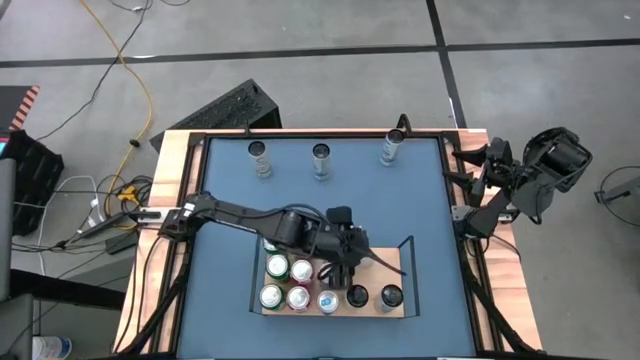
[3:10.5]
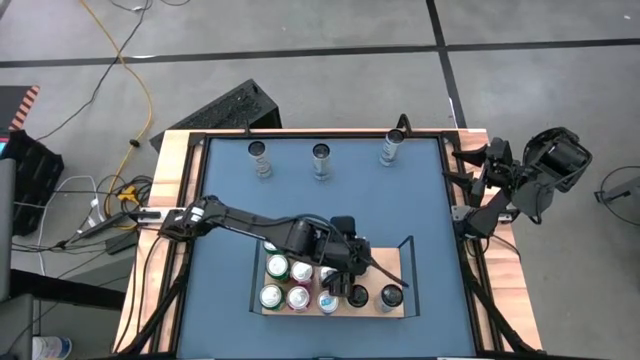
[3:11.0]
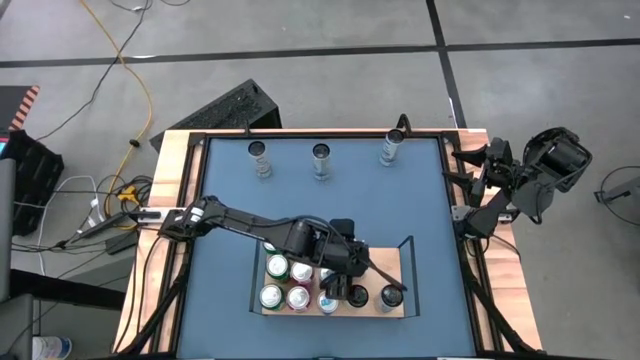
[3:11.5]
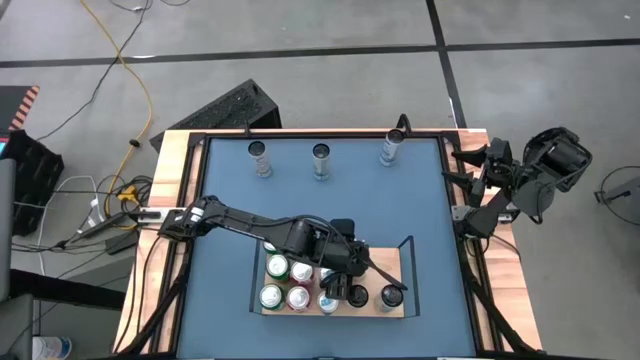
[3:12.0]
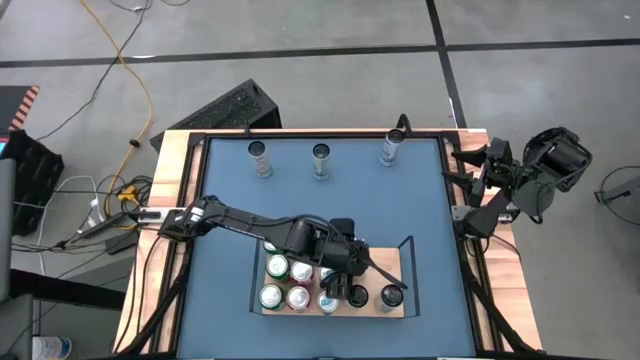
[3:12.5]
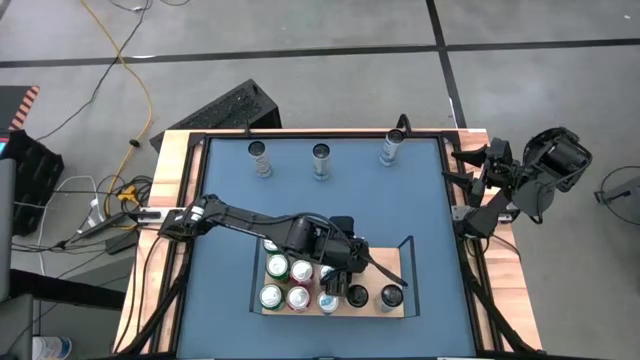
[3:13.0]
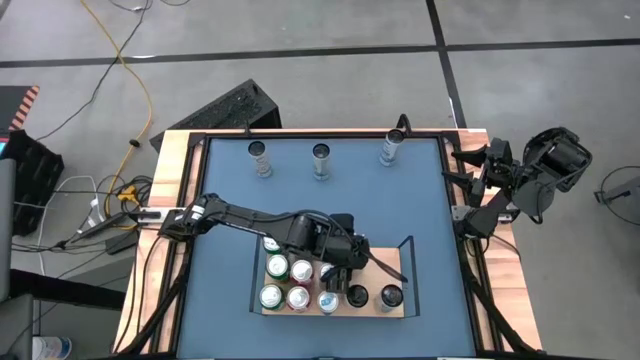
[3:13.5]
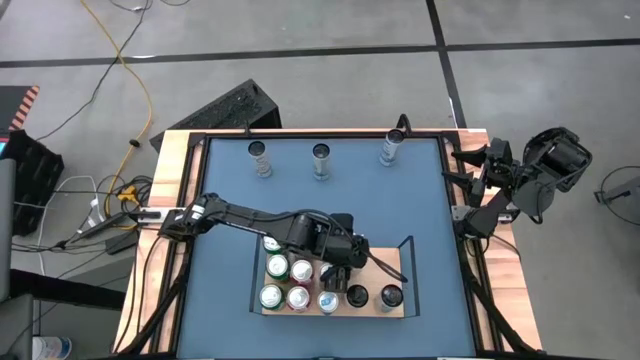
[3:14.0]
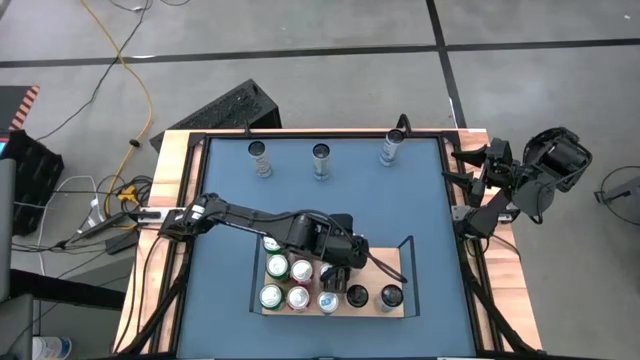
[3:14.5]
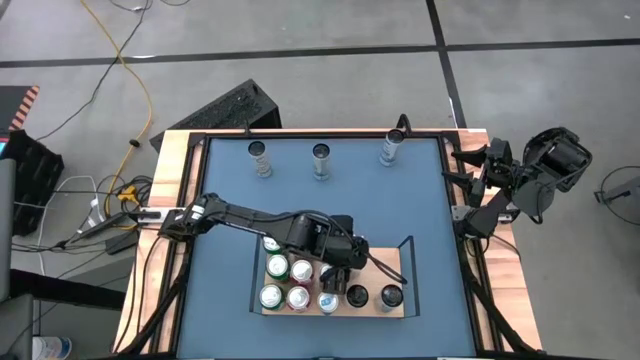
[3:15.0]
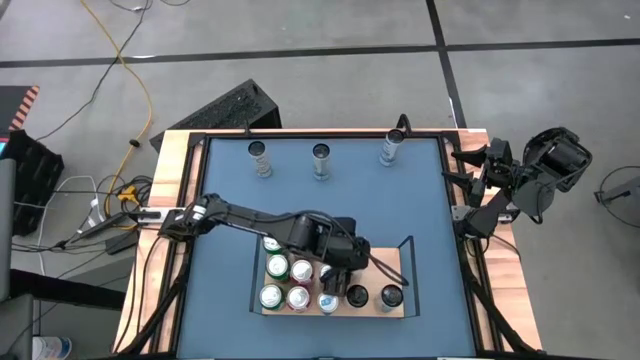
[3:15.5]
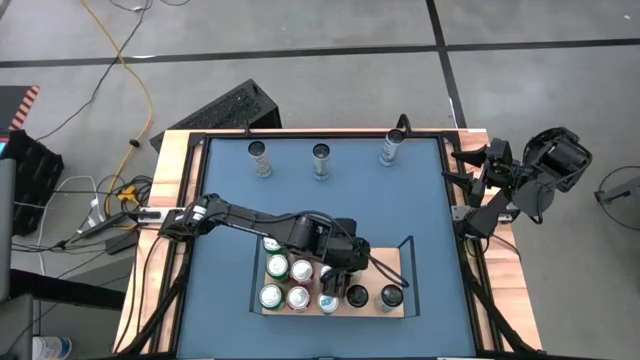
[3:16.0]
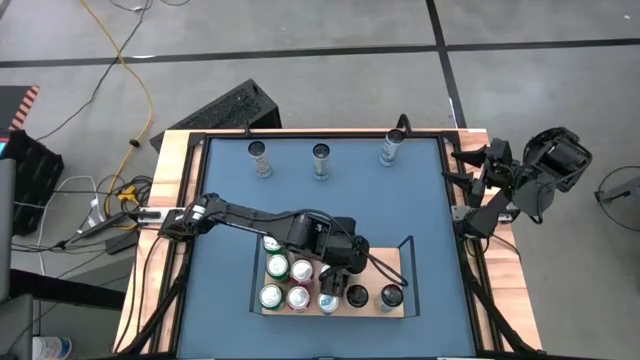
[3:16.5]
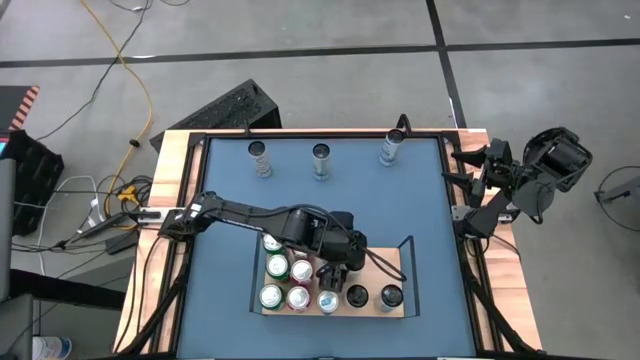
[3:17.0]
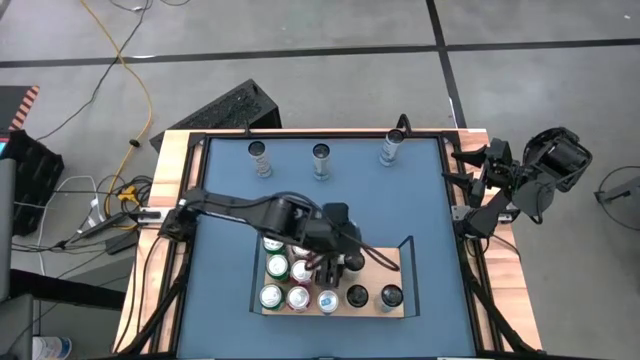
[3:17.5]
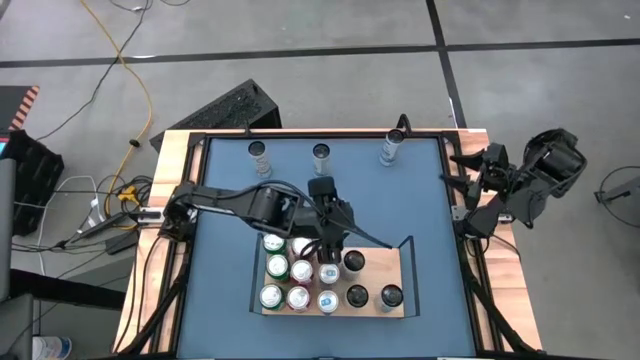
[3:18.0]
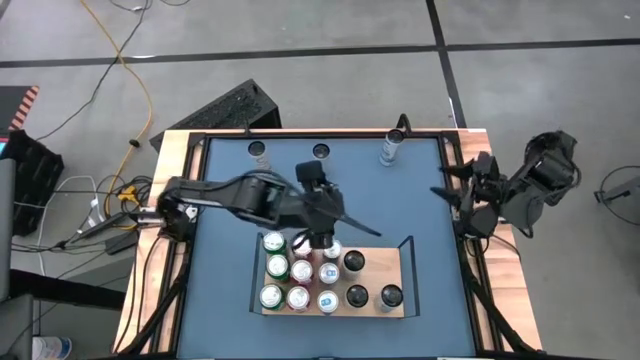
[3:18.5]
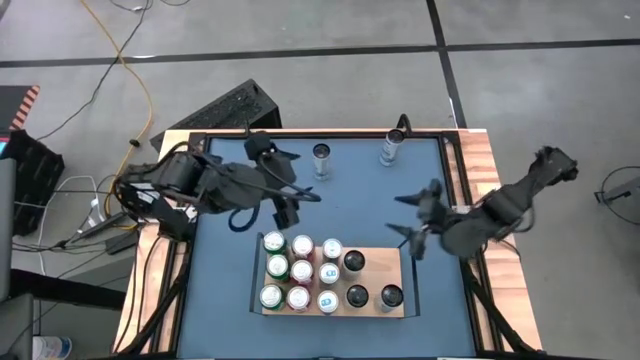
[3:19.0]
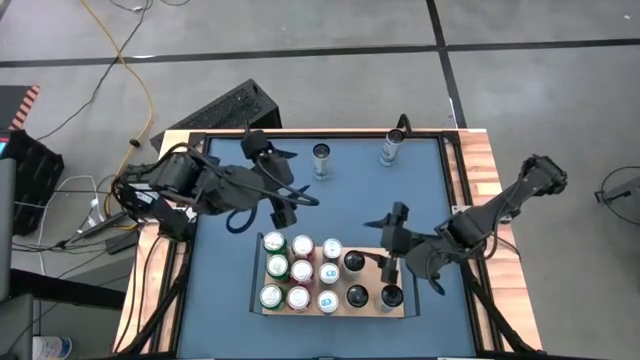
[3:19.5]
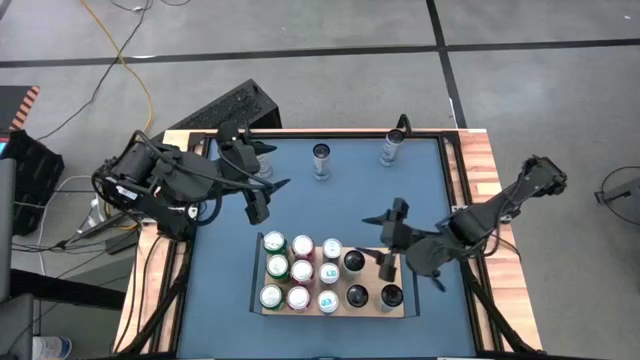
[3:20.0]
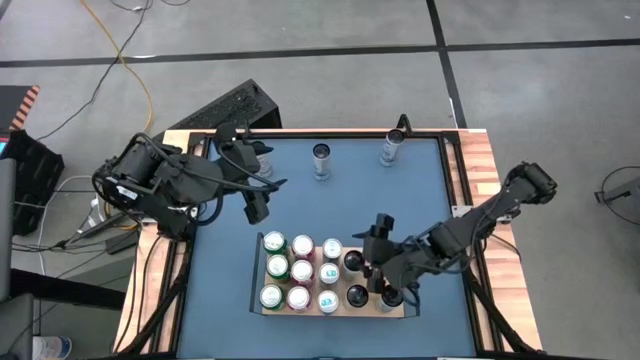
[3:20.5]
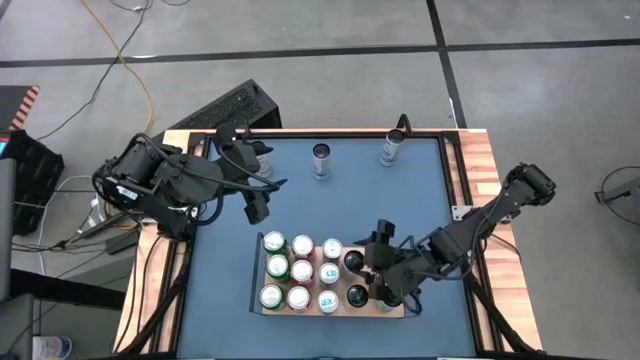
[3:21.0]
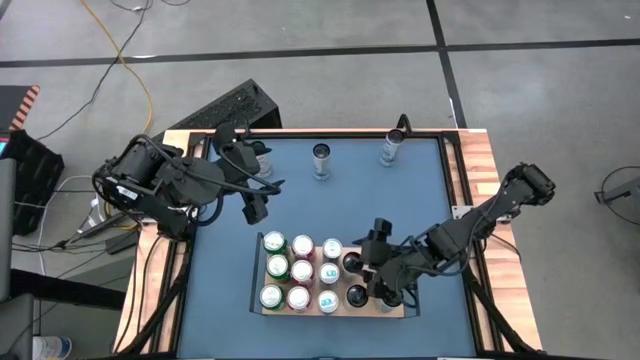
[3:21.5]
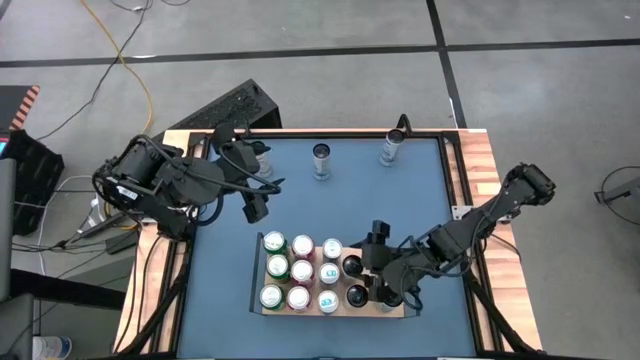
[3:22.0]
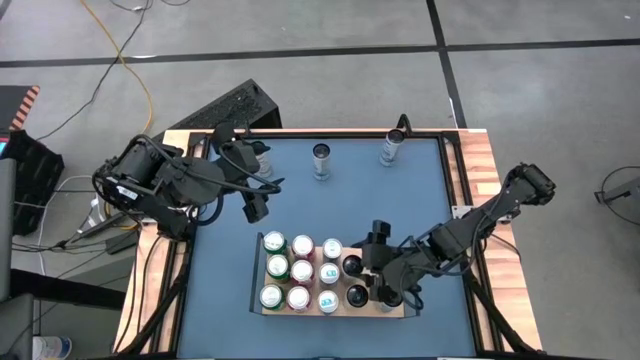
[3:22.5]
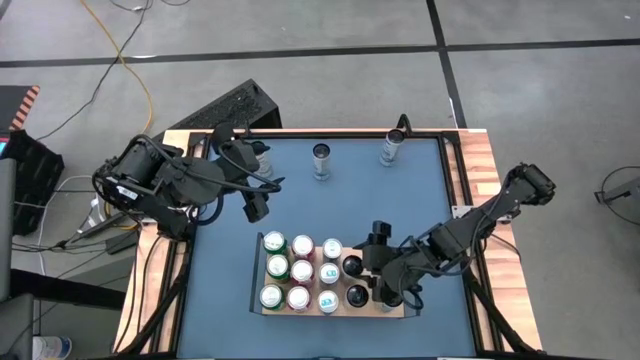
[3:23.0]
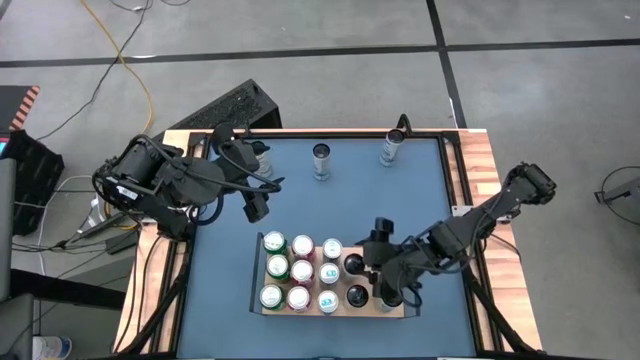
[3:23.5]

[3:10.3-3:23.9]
Task: Place canned beverage on shelf
Put the right white-yellow soda can on the shelf aligned with the other white-yellow soda can

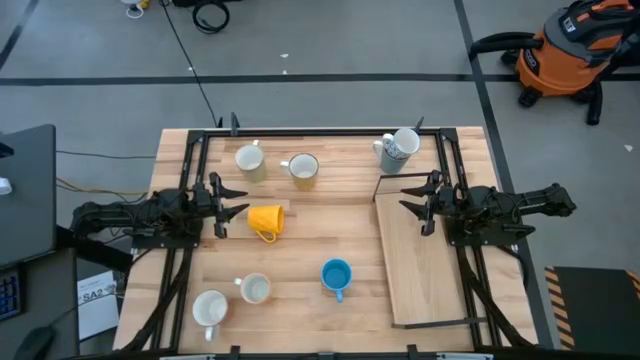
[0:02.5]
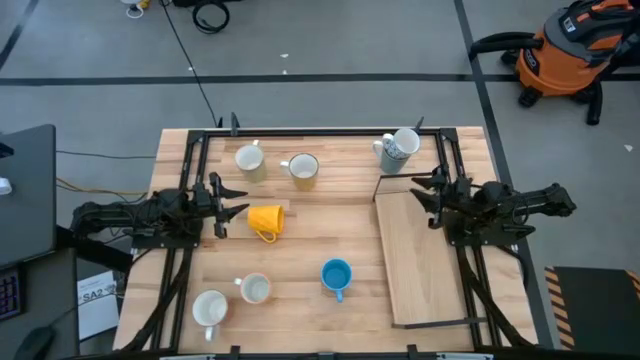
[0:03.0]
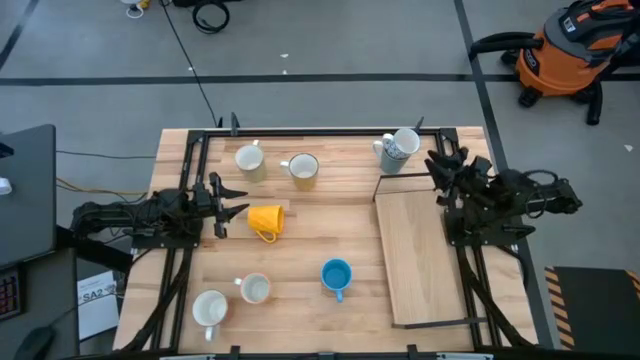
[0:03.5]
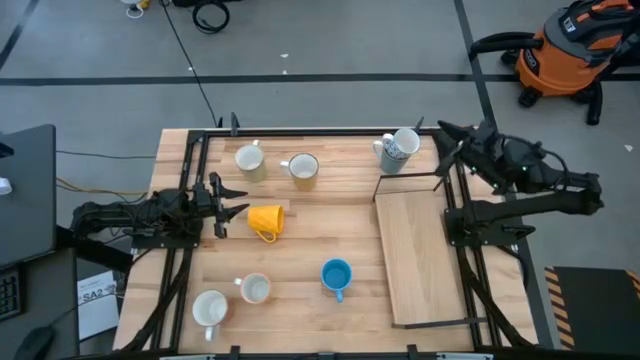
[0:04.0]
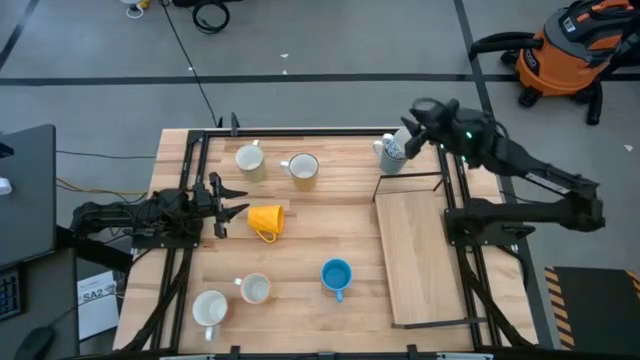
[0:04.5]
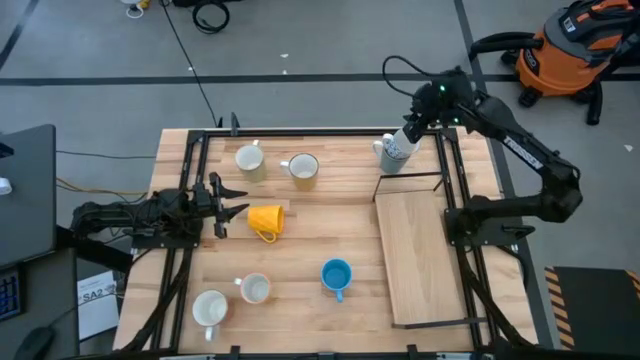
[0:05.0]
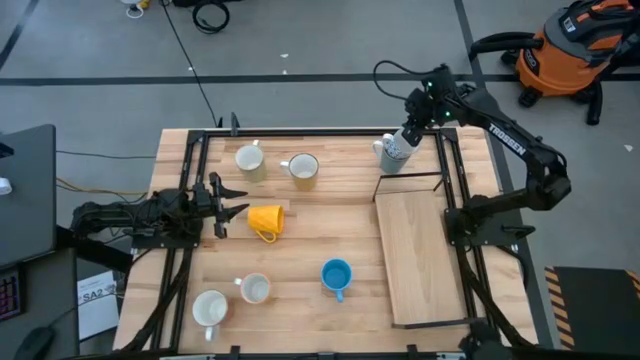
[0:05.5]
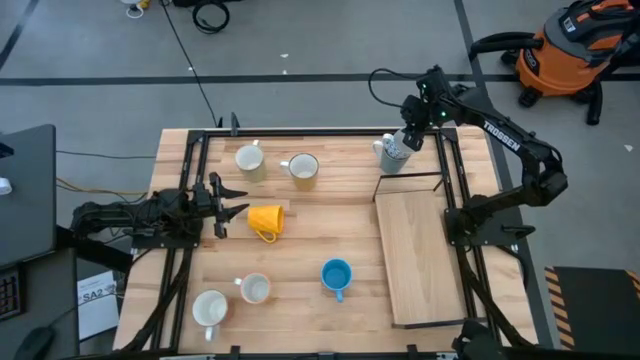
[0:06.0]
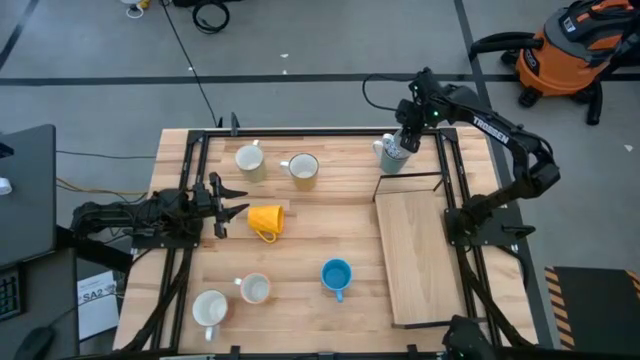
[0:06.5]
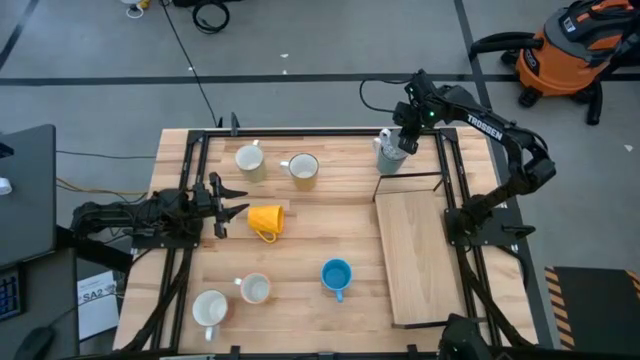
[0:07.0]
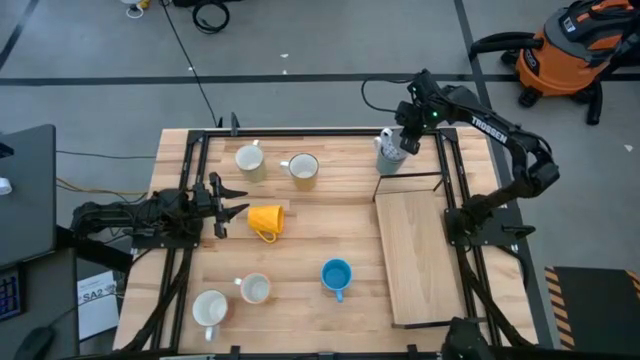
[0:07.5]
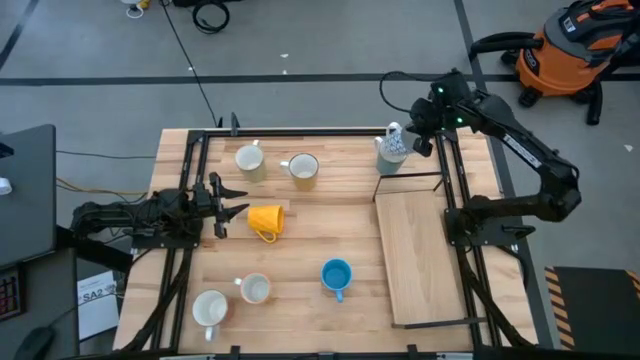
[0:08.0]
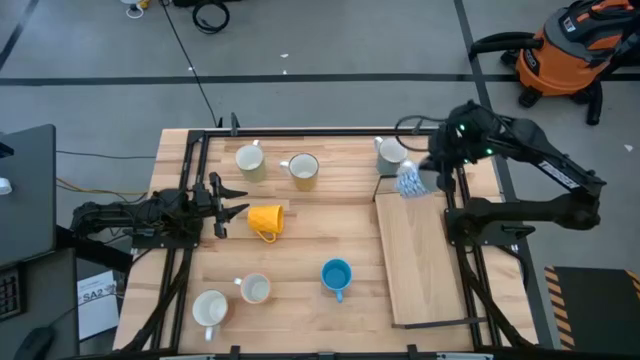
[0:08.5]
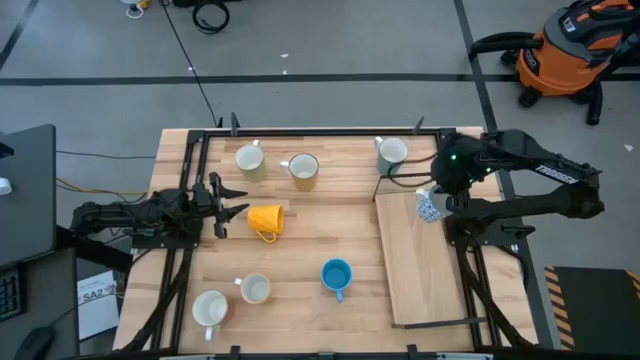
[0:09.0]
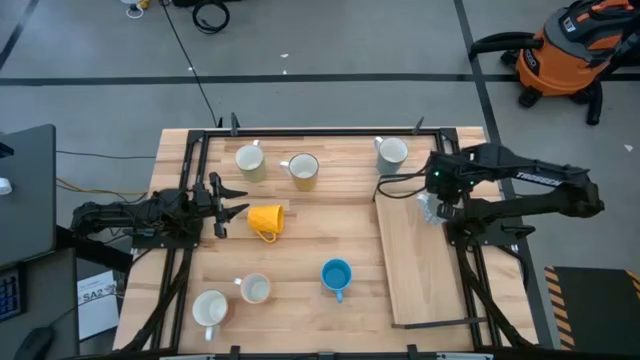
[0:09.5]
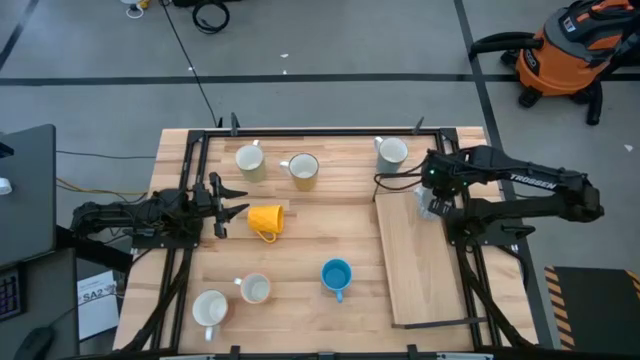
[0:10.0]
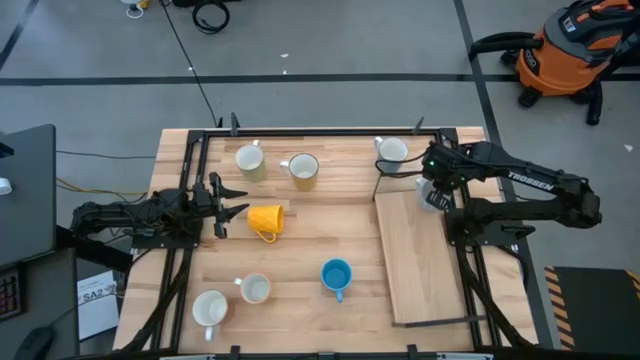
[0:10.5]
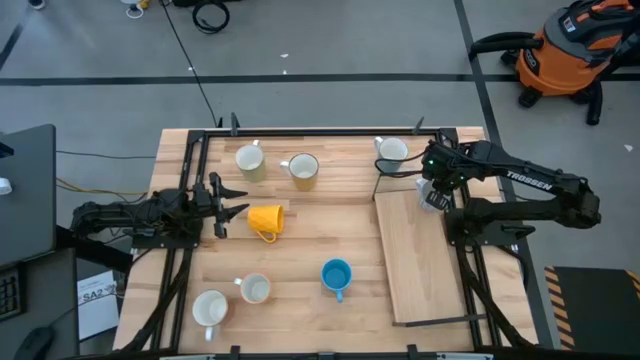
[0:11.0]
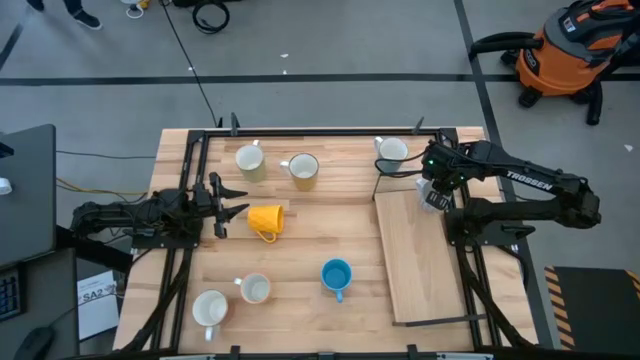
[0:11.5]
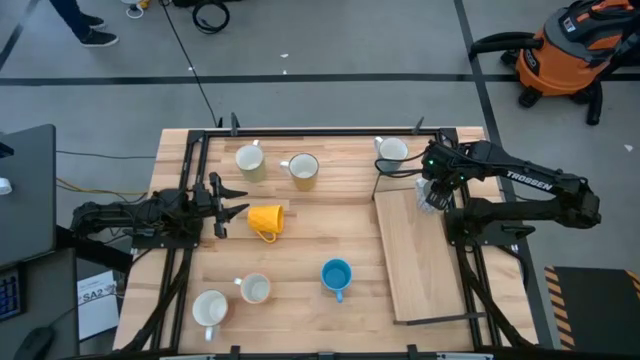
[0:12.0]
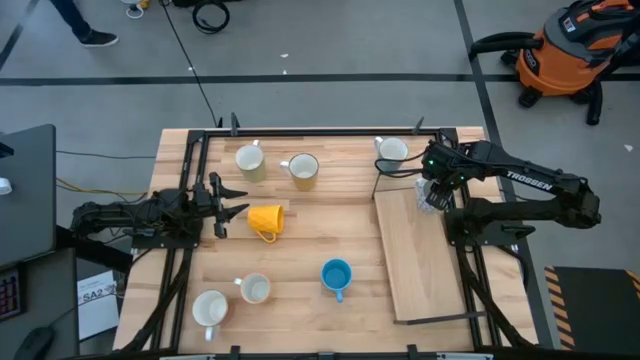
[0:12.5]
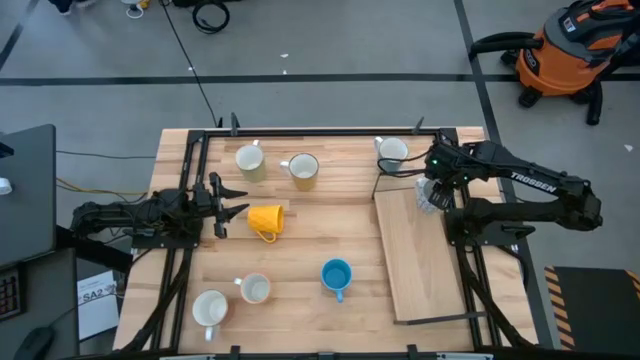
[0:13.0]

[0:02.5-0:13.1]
Task: Place coffee mugs
Put the blue patterned mug on the shelf
